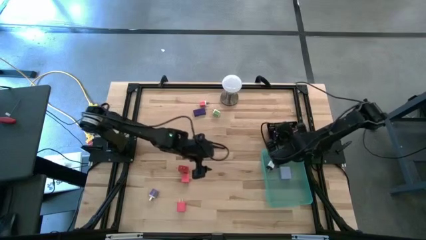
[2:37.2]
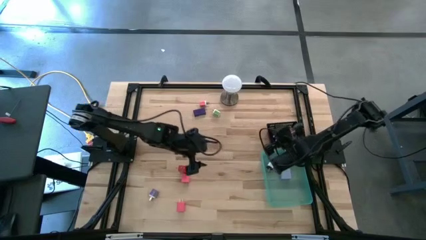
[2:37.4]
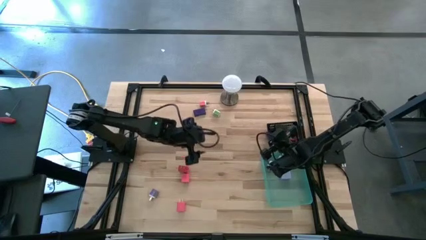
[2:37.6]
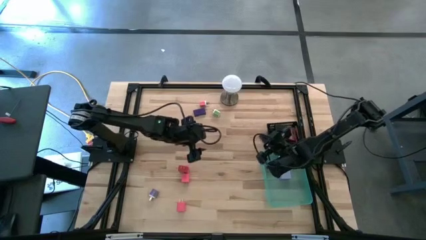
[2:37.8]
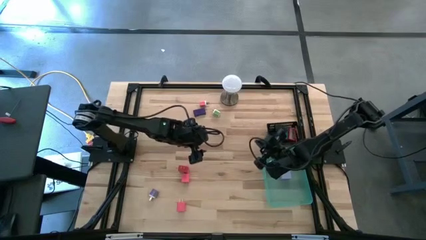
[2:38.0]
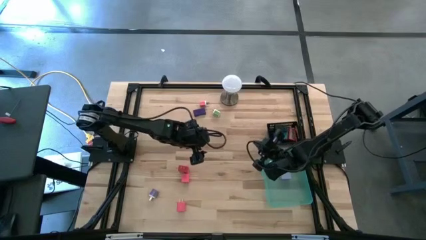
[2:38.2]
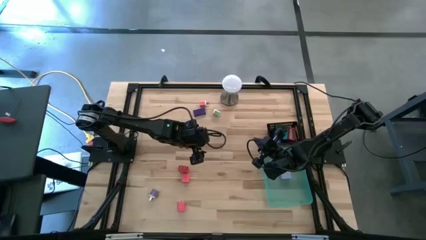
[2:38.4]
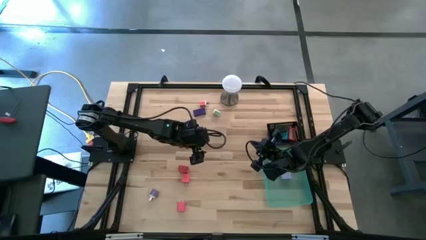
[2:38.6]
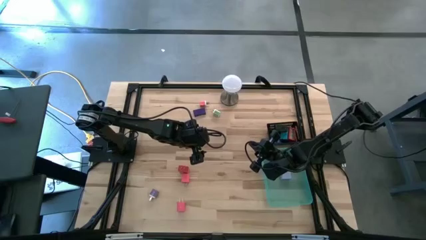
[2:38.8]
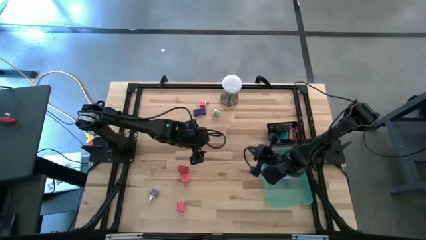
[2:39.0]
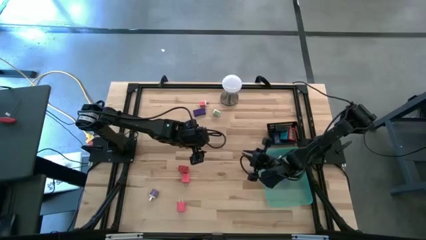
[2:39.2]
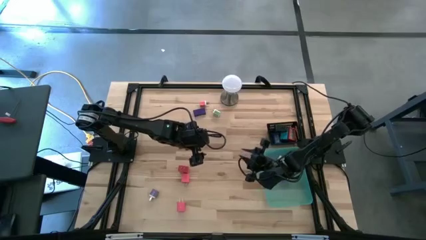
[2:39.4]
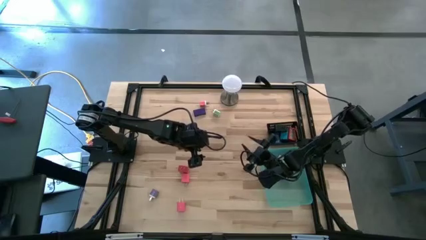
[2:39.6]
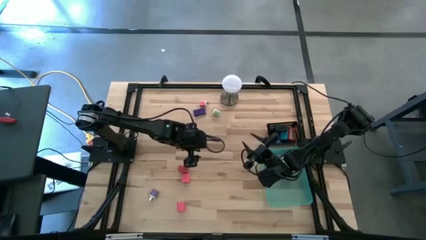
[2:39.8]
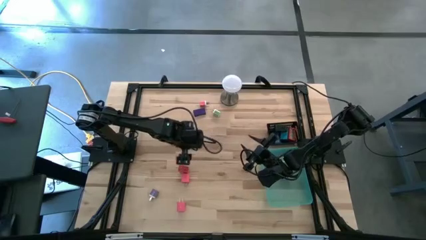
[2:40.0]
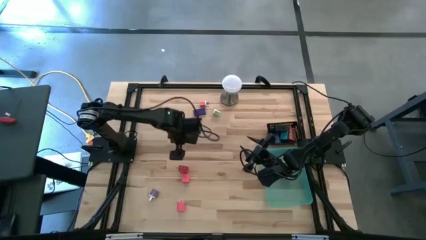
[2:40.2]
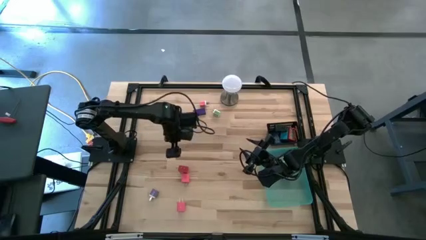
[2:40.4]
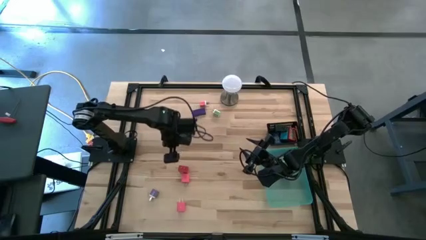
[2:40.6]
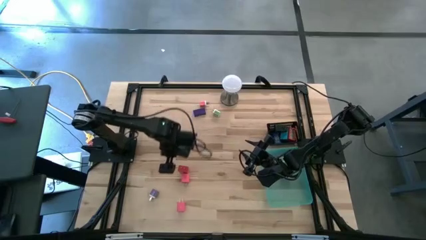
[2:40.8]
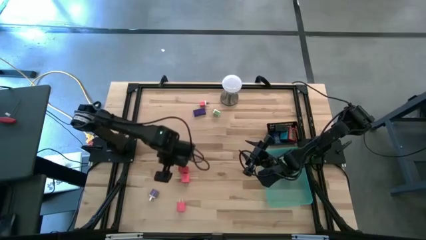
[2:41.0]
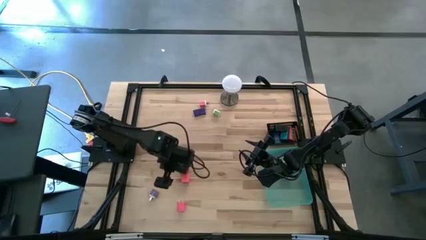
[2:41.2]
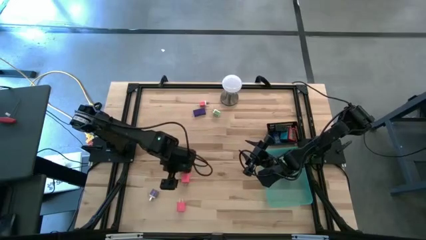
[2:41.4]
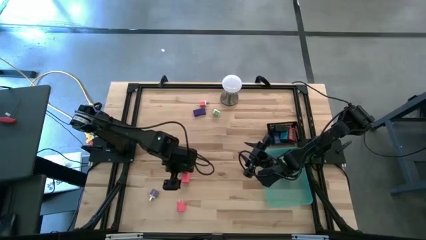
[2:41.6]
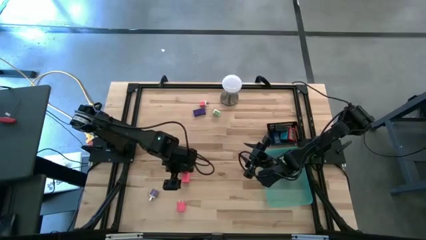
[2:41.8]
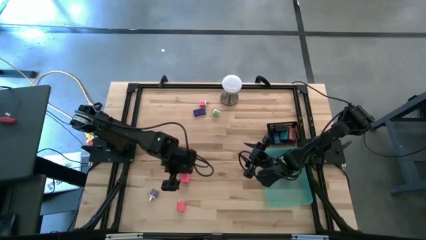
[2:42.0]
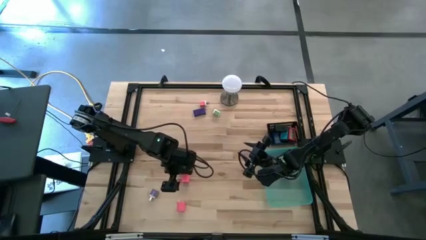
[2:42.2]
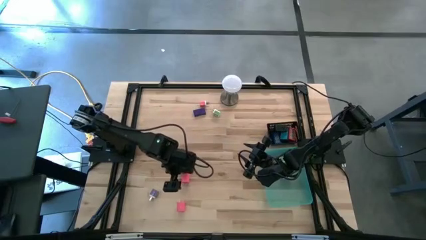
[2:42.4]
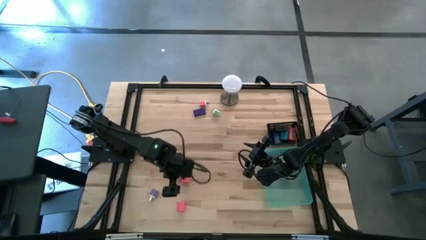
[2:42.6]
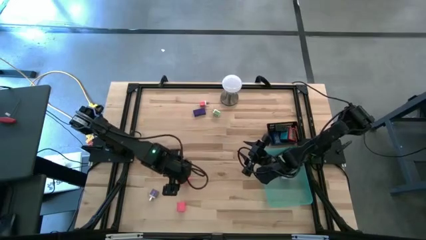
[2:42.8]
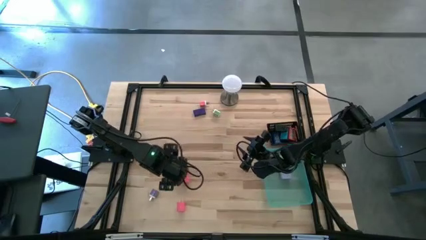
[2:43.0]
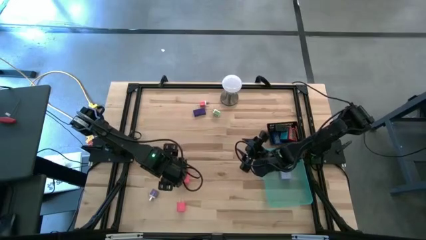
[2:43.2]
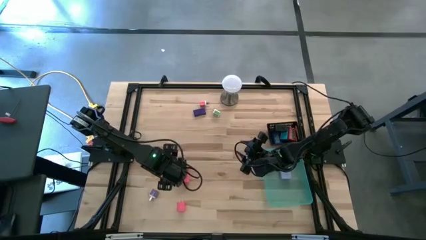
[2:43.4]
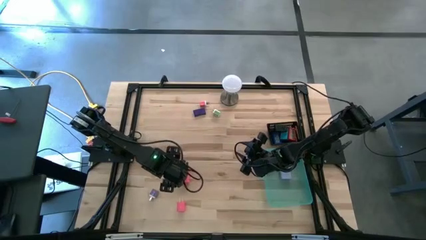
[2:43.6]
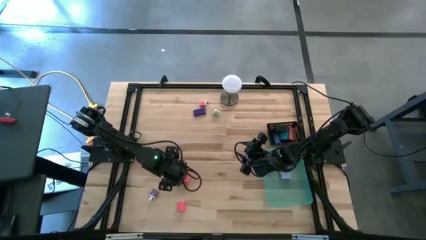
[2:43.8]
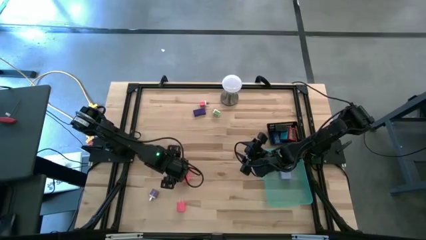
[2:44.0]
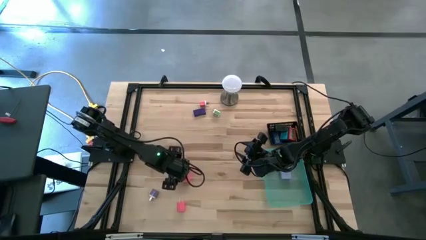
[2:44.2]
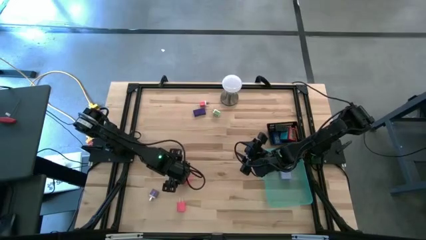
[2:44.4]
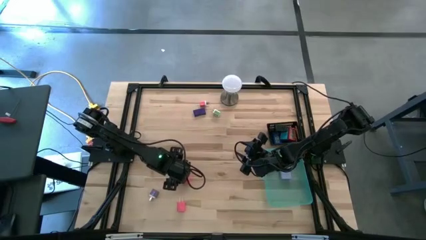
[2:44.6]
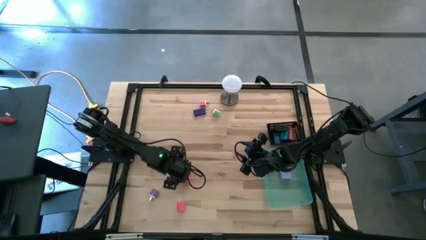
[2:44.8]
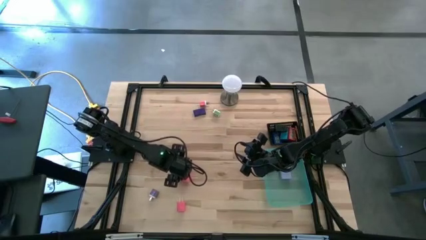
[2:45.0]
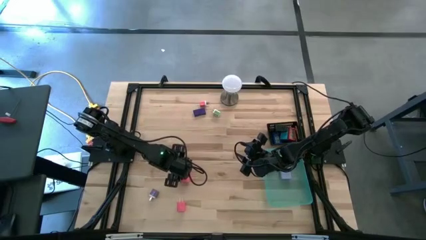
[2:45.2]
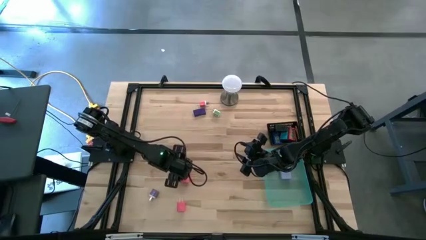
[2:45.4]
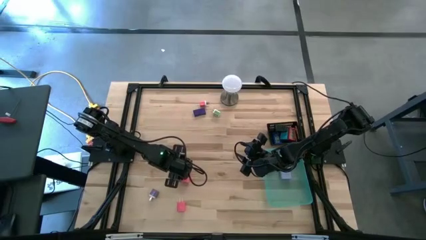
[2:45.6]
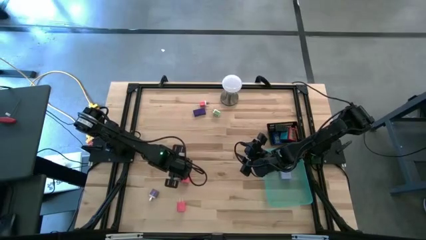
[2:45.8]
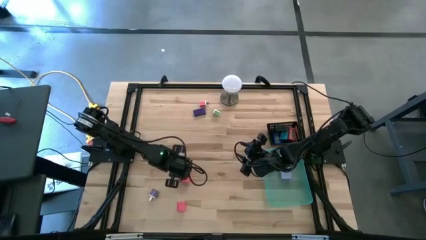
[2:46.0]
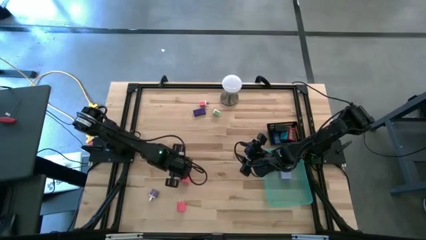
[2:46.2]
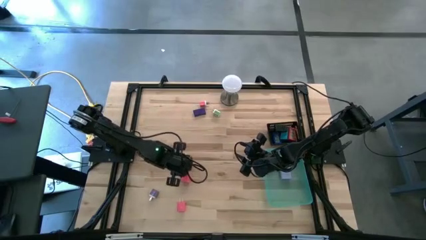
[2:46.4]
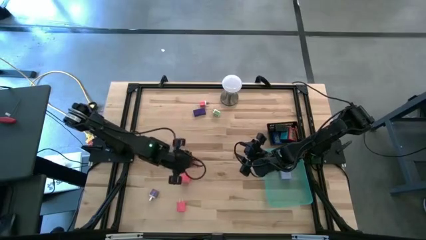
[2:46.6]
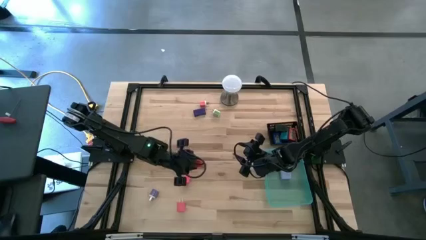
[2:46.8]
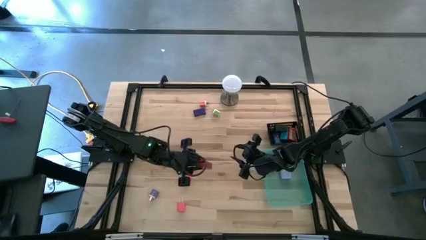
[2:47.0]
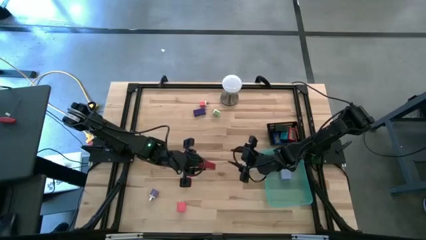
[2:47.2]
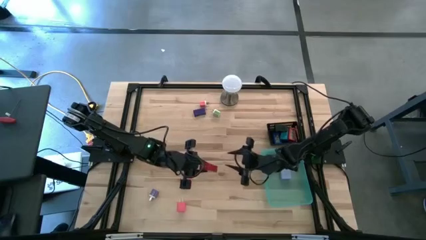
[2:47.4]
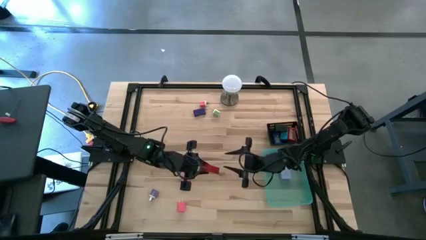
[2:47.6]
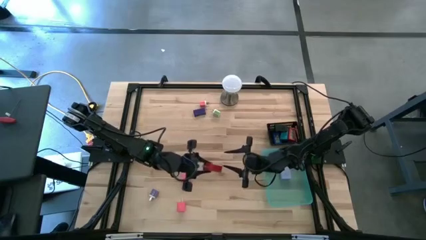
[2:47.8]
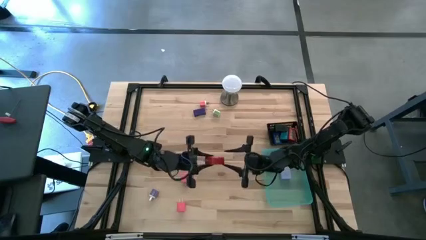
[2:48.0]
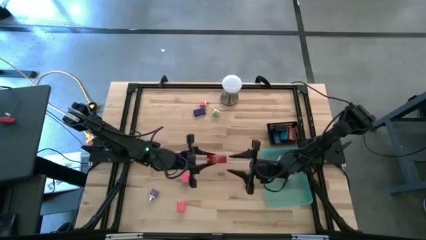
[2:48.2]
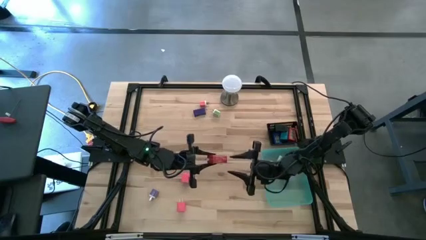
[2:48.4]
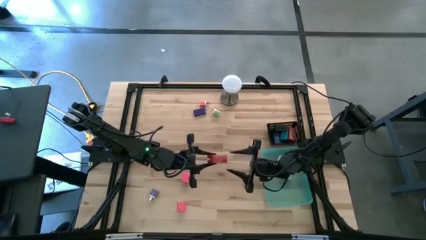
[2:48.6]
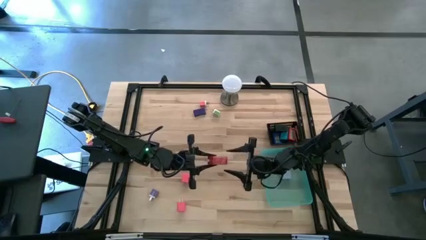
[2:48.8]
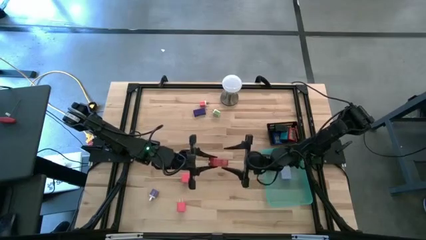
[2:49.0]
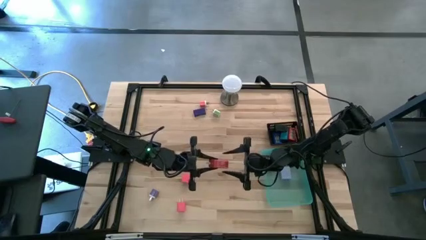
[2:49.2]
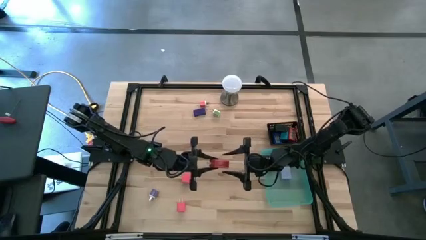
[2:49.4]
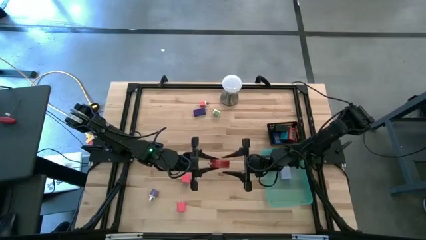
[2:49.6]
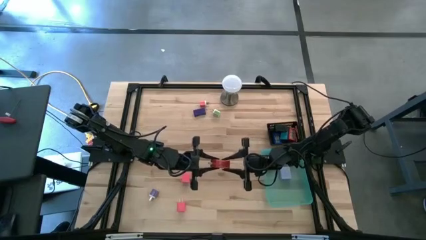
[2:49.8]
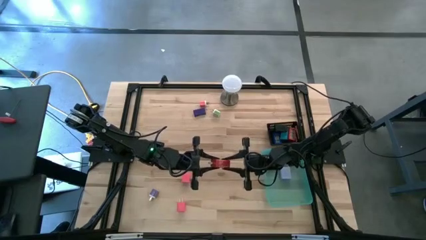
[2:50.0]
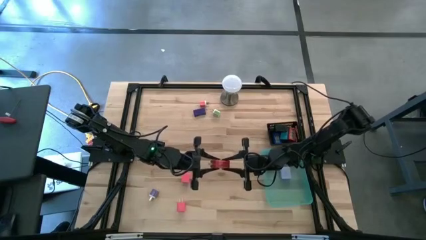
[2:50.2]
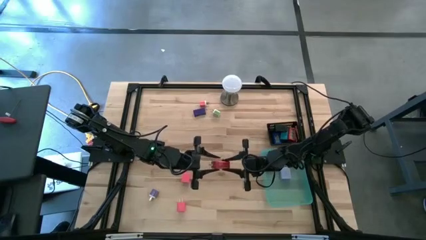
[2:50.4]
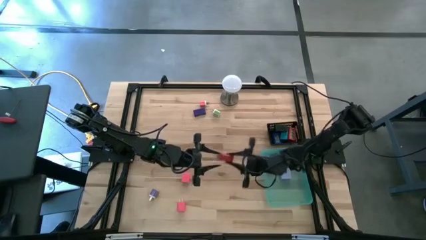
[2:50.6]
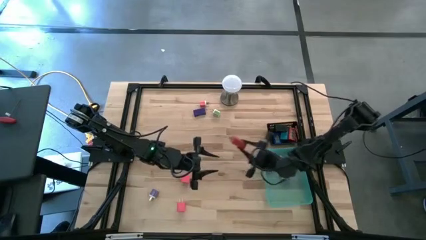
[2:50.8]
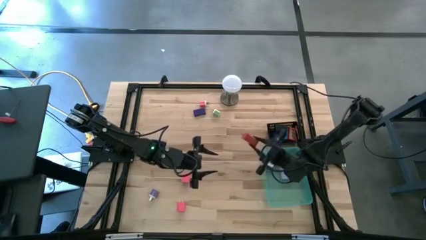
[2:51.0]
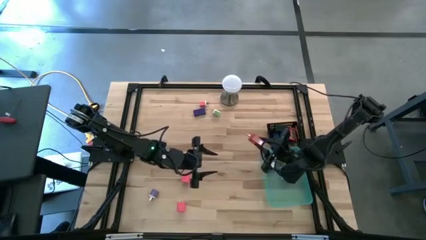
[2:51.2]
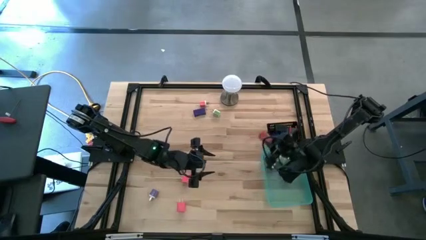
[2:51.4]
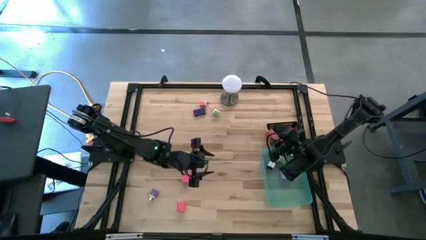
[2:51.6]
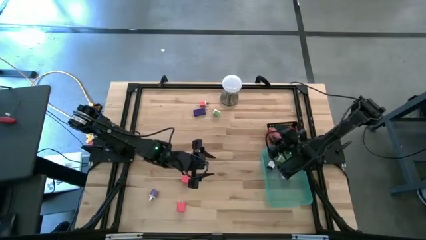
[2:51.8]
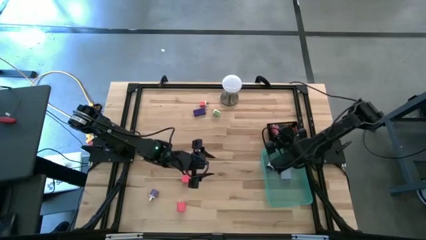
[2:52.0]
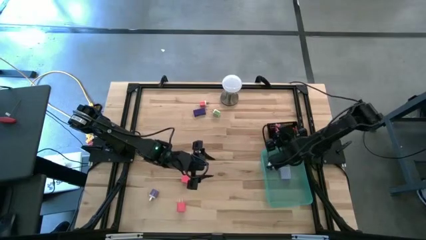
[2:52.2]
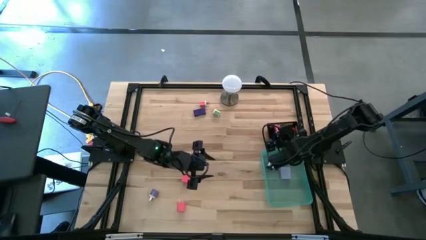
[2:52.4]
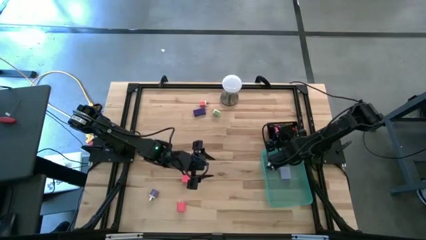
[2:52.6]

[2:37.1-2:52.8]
Task: Pick & Place Office items
Put the red charger adapter into the green bin
